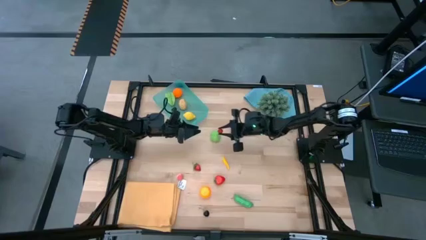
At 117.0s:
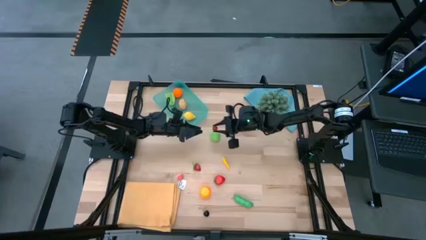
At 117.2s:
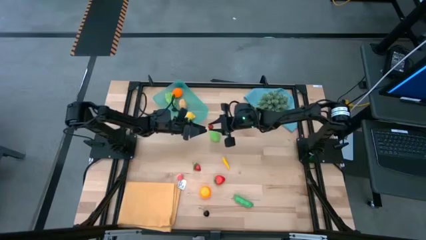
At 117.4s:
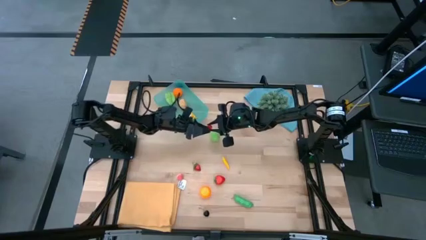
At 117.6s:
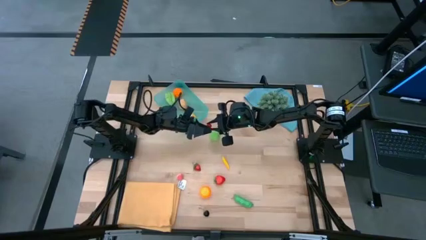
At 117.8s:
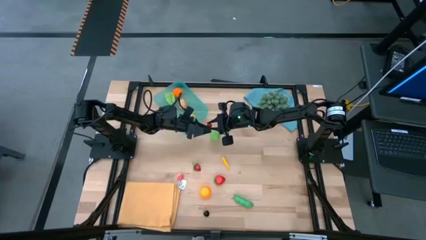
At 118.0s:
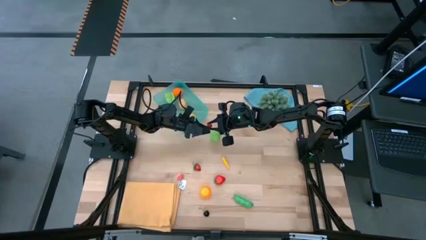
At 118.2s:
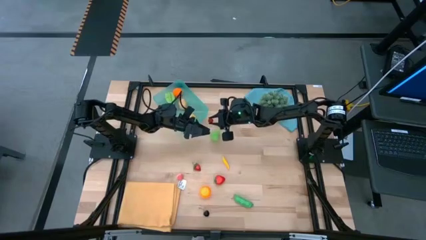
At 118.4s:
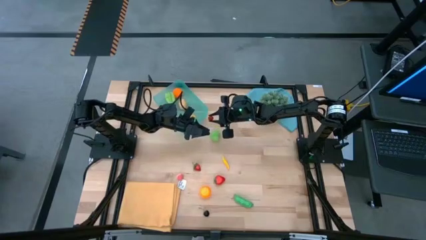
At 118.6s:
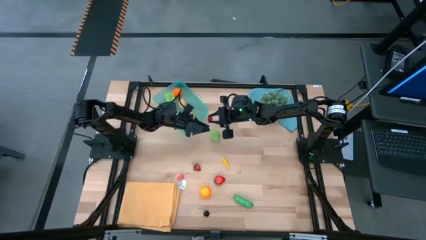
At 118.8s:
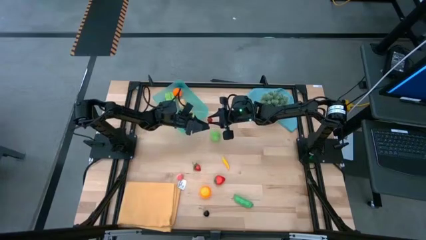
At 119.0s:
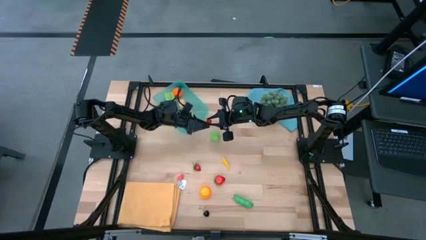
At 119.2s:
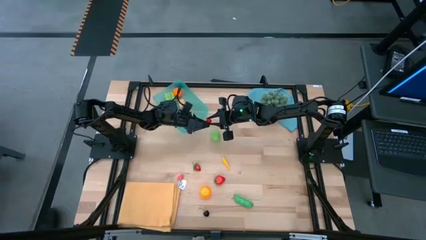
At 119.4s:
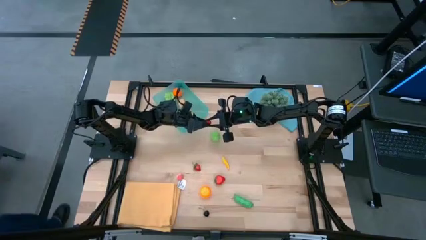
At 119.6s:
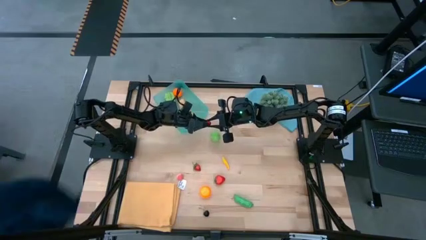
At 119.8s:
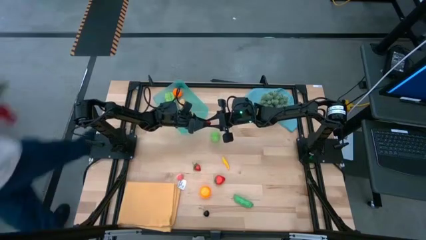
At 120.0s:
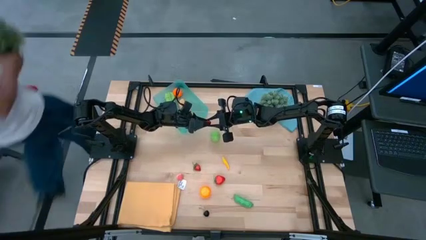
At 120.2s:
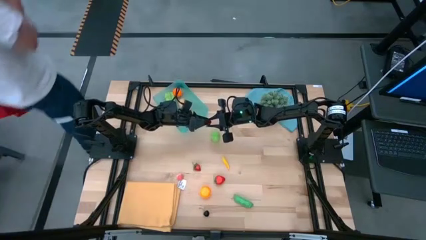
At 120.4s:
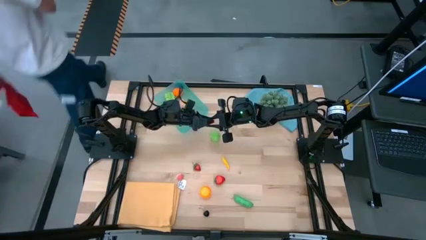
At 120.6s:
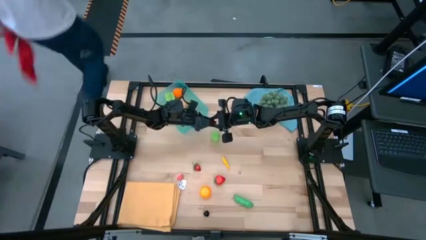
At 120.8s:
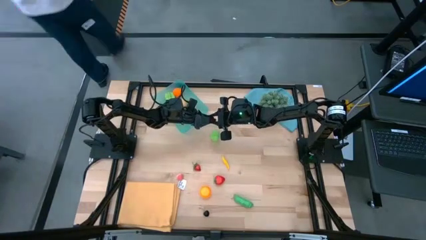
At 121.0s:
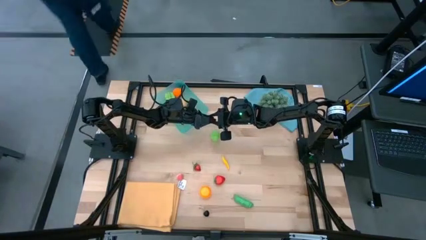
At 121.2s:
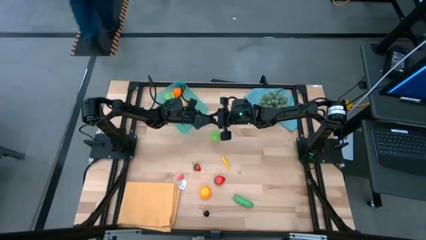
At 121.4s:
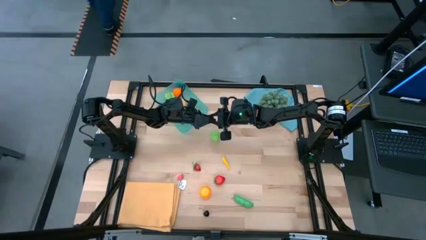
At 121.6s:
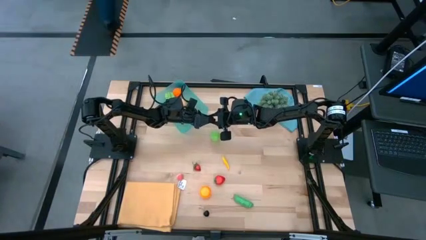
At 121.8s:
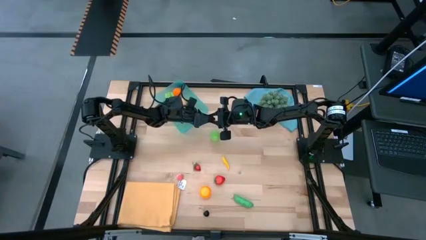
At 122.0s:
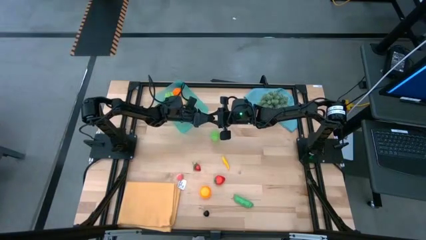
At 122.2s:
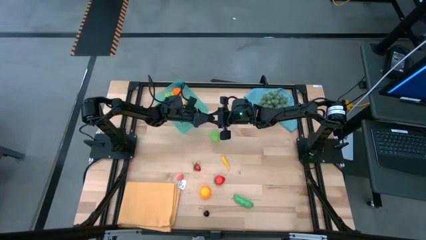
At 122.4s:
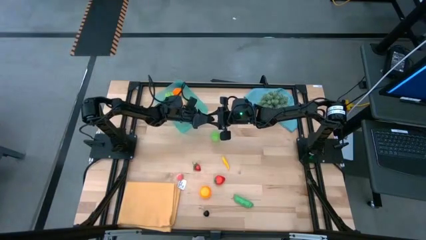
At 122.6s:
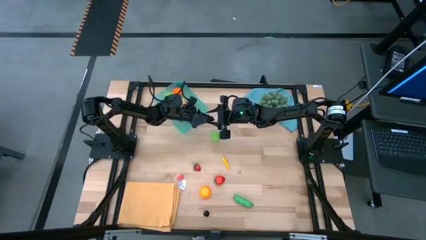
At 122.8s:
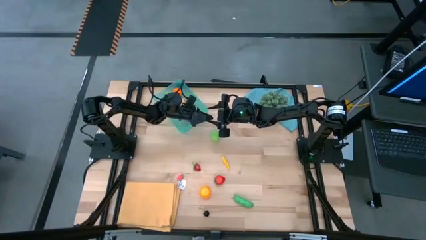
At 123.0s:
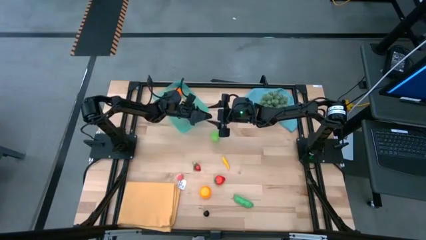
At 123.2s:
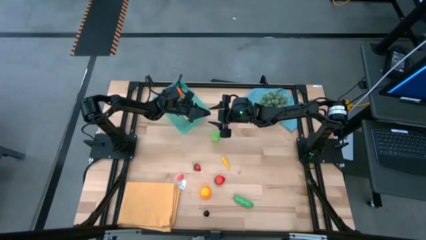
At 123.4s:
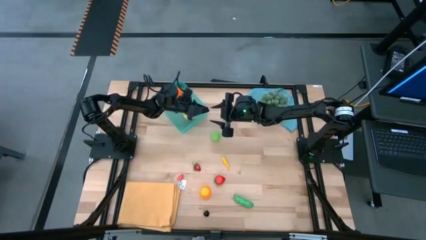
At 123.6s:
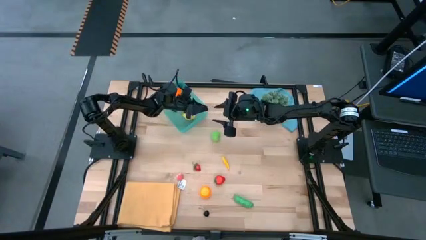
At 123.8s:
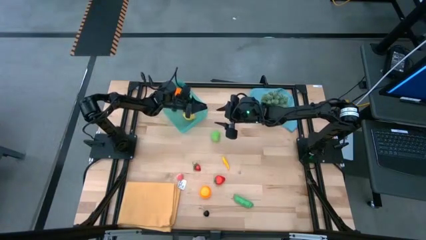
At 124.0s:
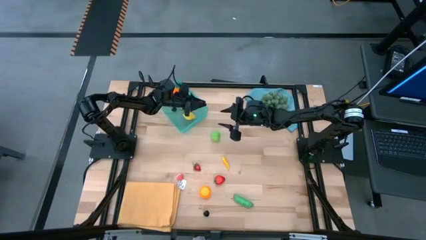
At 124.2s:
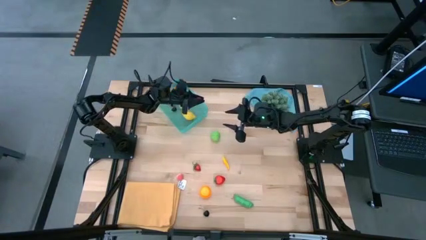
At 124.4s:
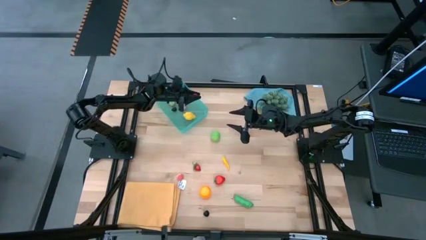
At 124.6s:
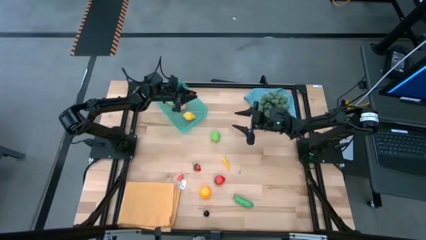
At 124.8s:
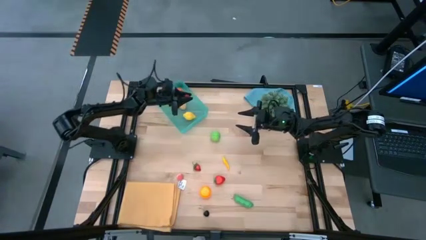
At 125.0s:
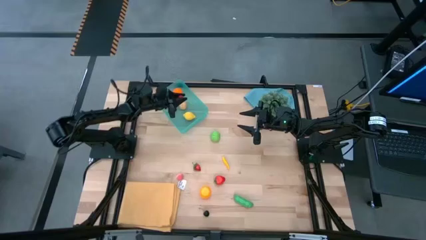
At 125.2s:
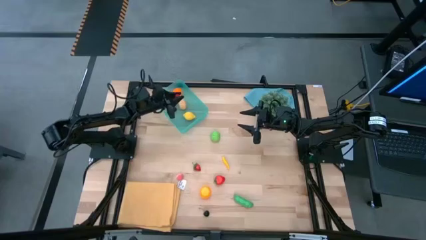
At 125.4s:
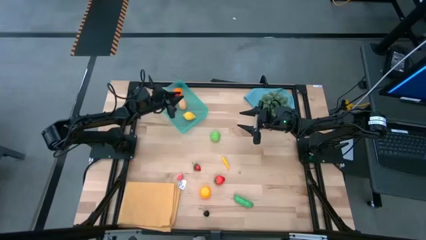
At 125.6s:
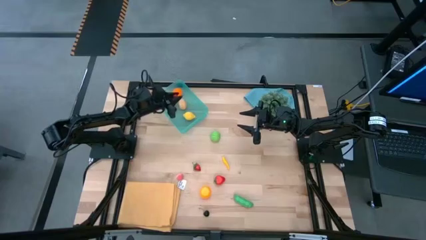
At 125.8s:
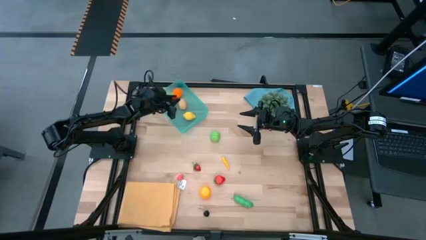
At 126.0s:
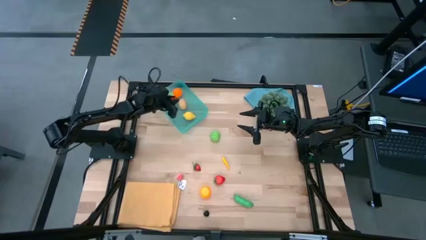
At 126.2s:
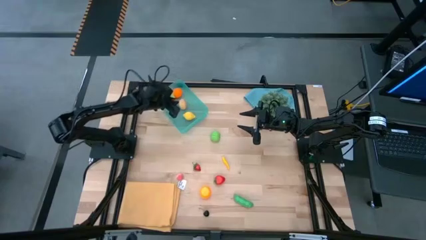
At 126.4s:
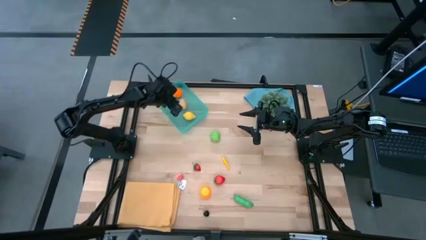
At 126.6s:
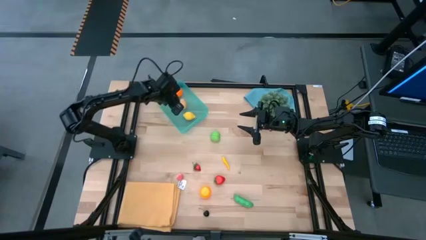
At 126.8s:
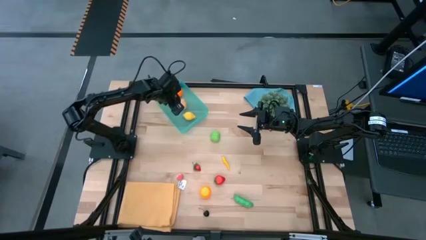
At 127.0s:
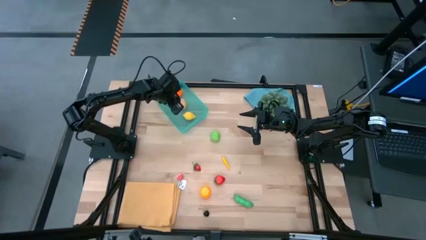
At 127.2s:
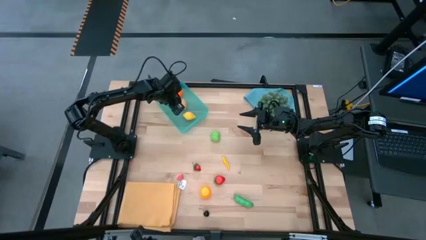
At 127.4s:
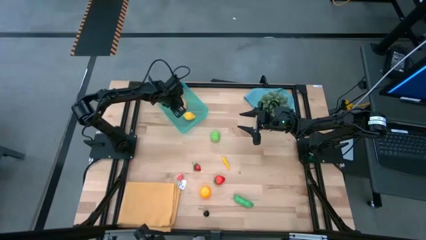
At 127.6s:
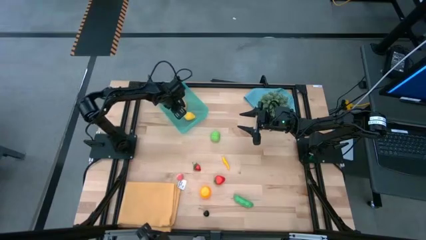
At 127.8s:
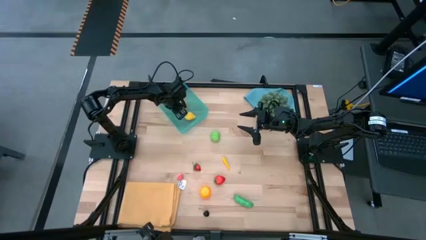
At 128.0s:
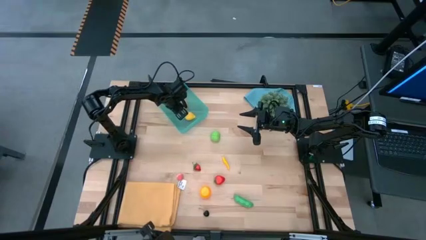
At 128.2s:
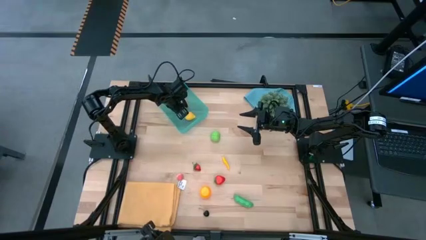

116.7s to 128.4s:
Task: Pick and placing Produce into tupperware
Put the red raspberry into the blue bin

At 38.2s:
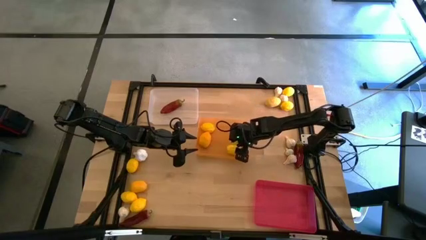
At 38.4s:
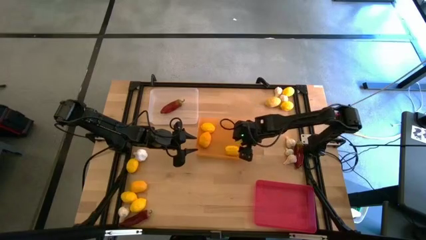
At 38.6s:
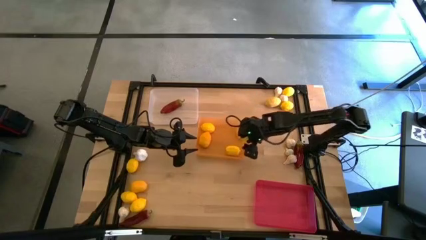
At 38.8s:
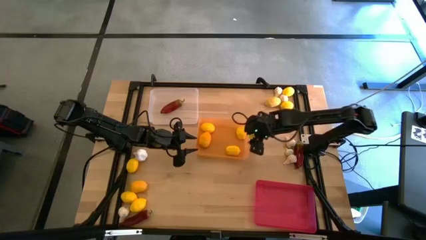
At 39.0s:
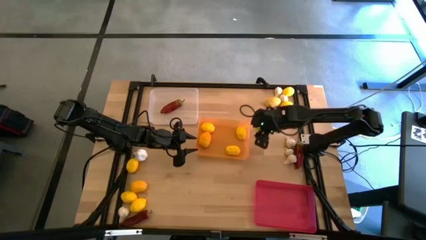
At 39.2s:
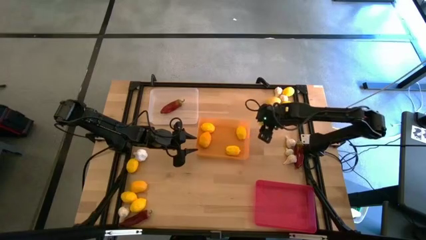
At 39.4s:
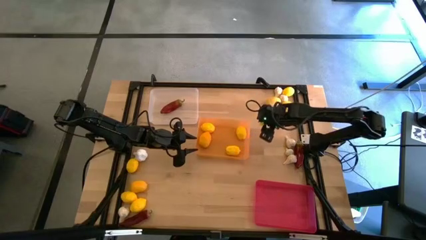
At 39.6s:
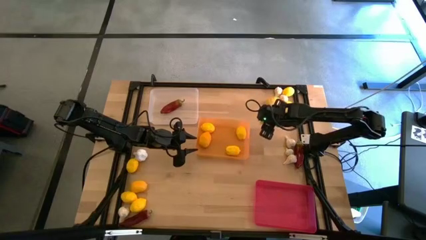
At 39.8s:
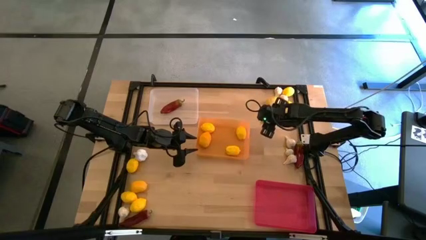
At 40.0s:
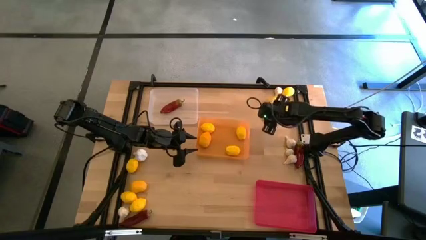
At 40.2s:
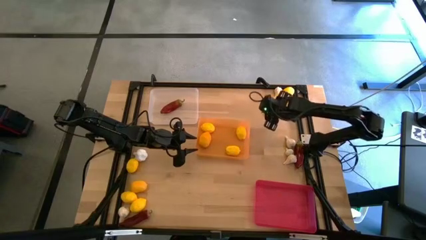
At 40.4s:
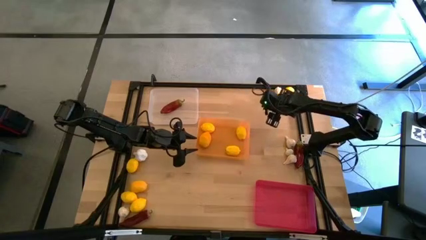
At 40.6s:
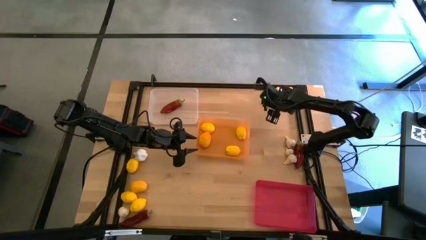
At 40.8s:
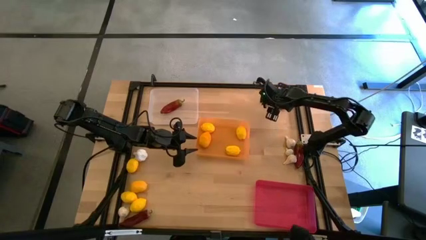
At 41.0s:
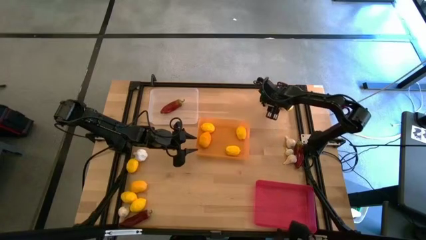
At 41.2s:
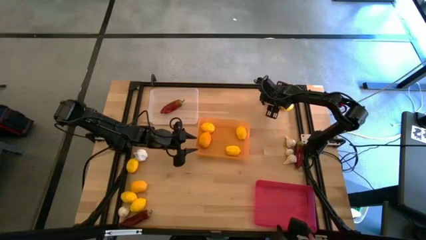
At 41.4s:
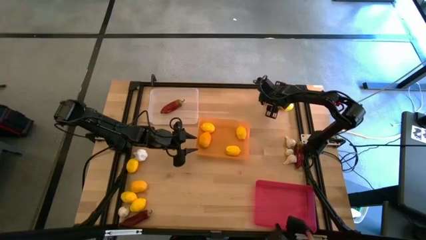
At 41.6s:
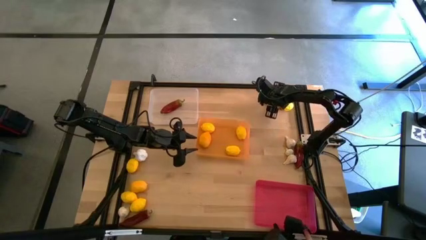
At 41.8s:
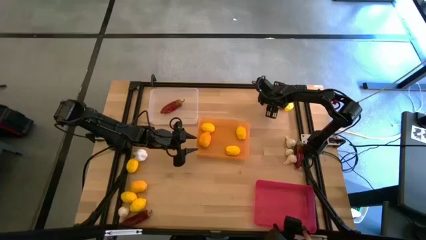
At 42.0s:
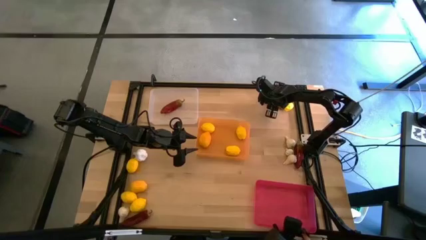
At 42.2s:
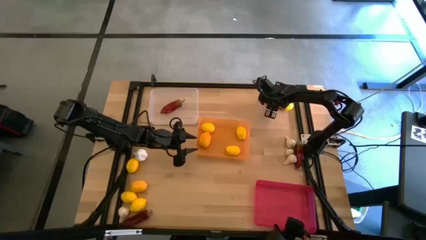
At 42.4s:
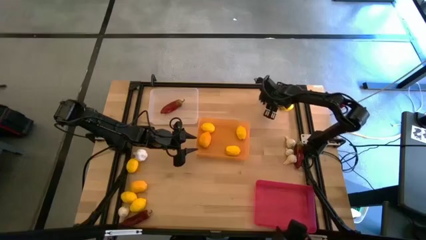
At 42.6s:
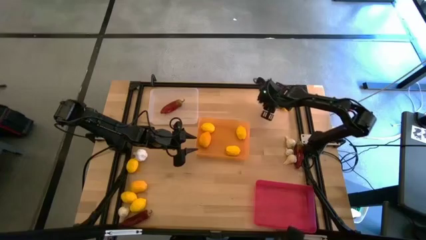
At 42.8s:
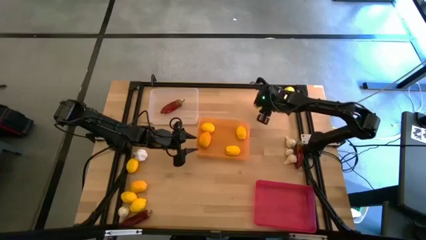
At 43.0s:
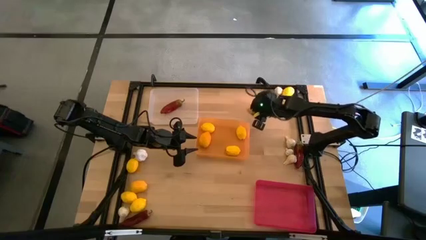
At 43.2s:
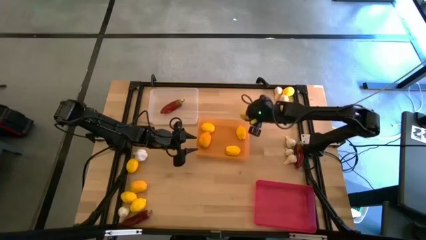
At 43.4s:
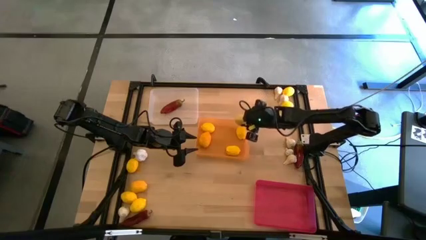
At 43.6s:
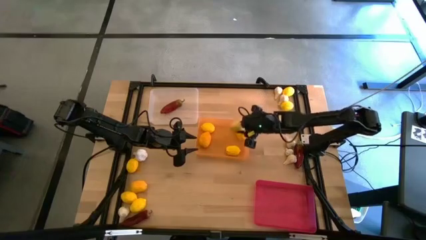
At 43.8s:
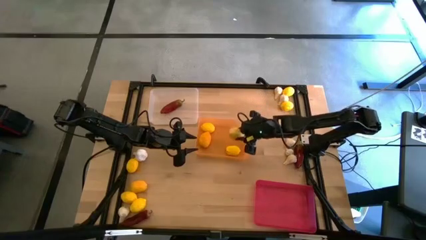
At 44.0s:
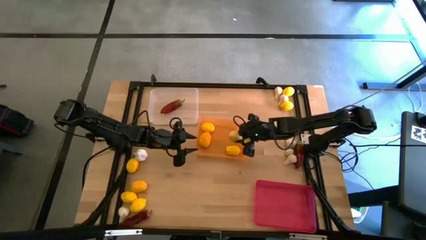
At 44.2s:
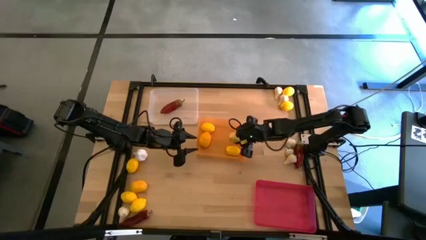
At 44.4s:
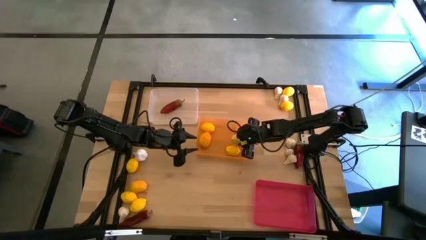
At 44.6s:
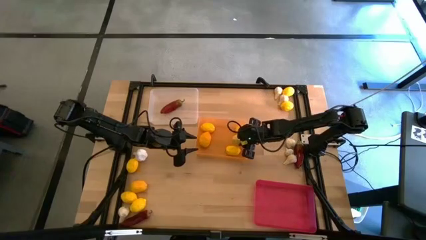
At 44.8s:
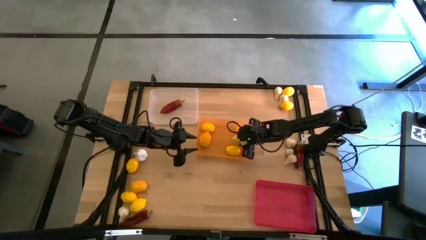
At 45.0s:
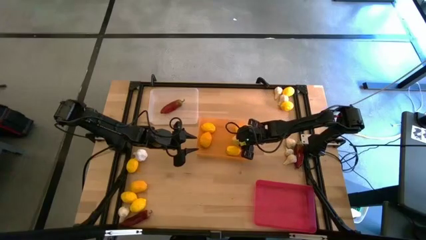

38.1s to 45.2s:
Task: Sort produce into baskets
Put the lemon into the orange bin
